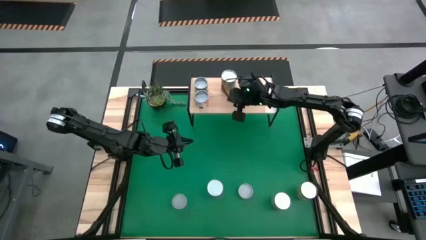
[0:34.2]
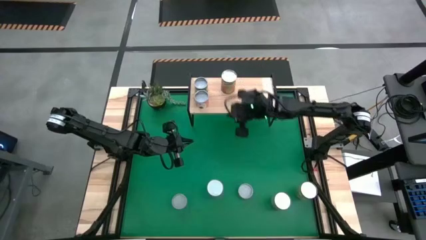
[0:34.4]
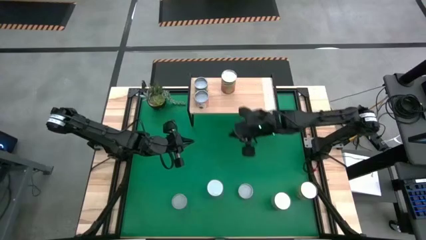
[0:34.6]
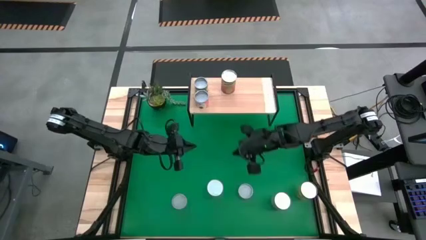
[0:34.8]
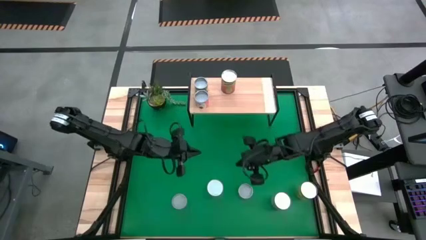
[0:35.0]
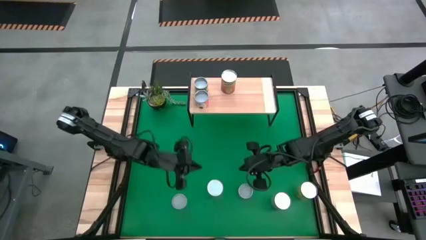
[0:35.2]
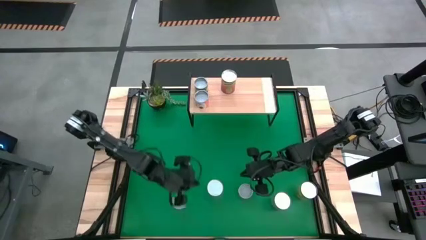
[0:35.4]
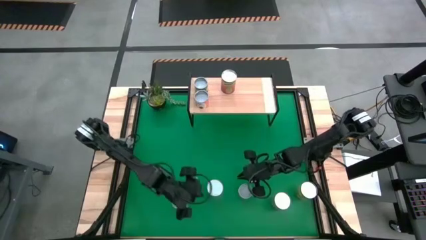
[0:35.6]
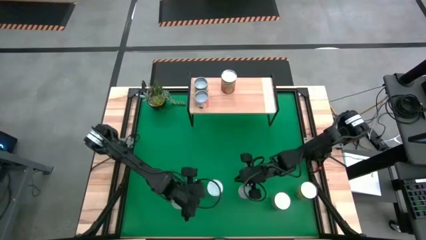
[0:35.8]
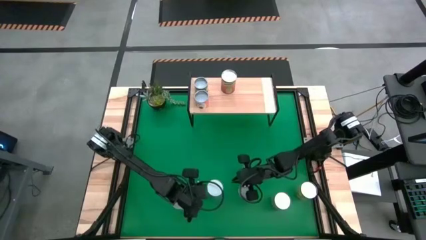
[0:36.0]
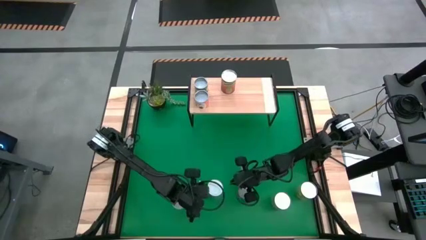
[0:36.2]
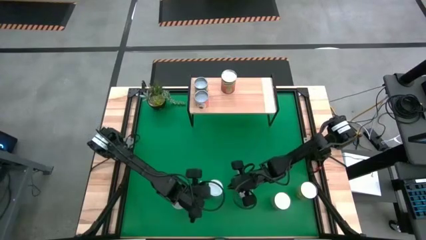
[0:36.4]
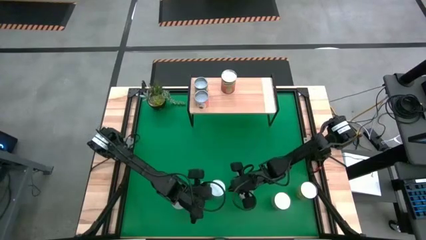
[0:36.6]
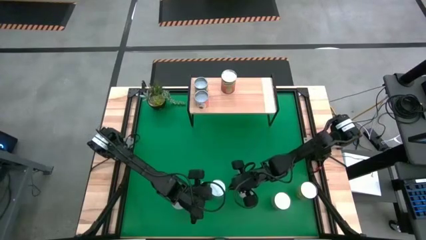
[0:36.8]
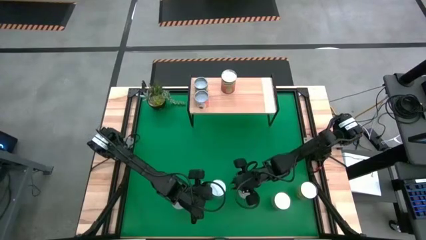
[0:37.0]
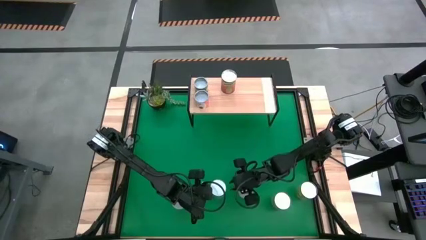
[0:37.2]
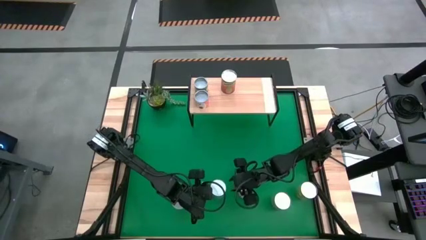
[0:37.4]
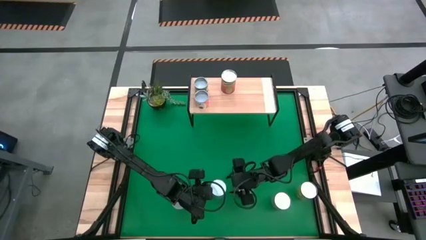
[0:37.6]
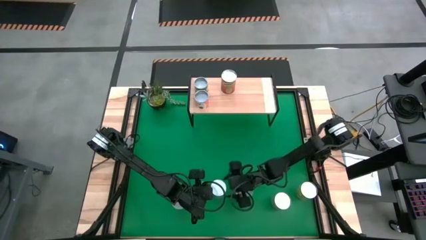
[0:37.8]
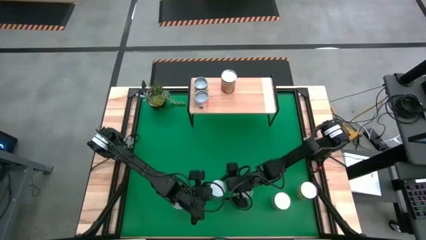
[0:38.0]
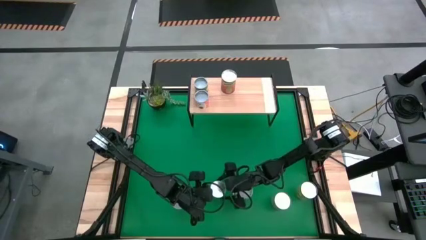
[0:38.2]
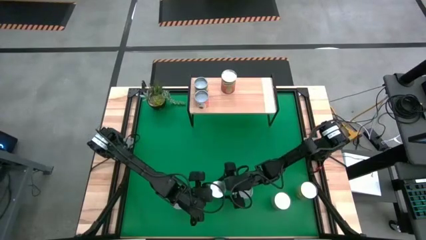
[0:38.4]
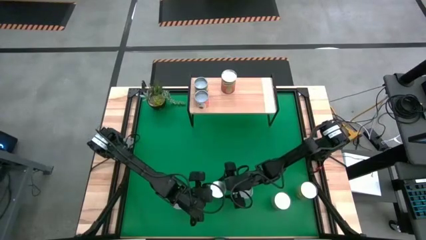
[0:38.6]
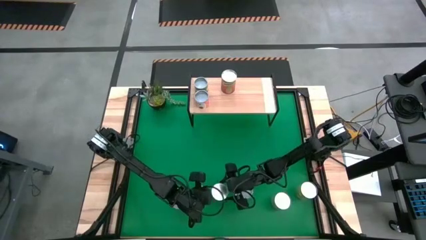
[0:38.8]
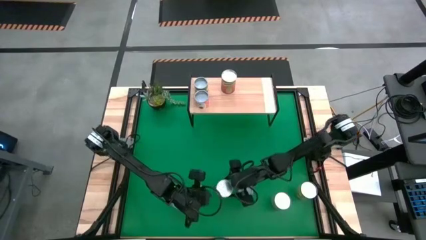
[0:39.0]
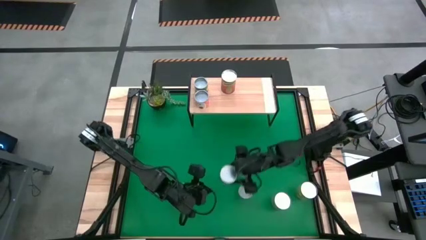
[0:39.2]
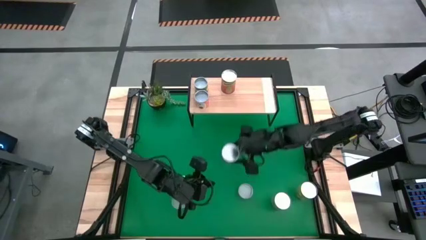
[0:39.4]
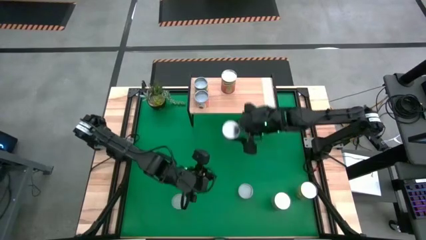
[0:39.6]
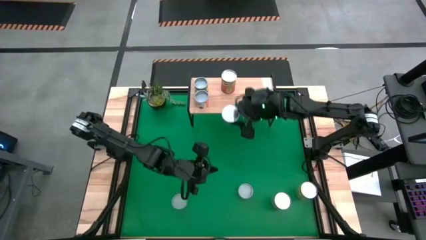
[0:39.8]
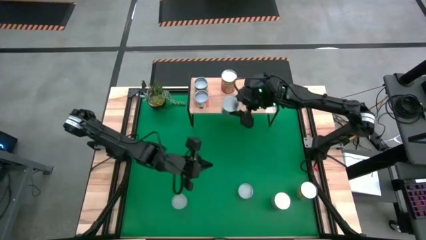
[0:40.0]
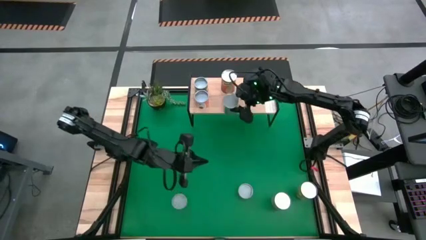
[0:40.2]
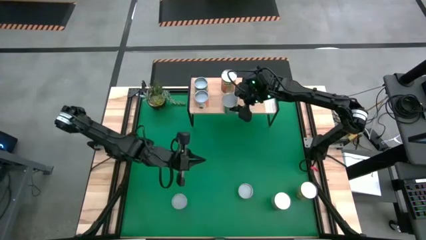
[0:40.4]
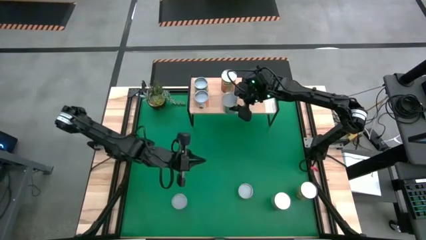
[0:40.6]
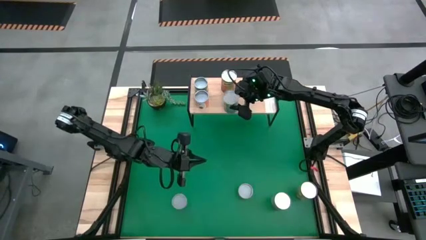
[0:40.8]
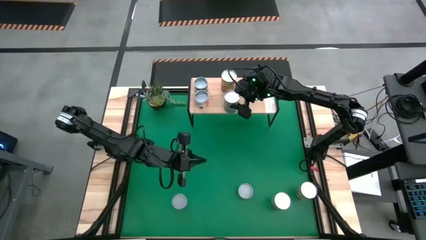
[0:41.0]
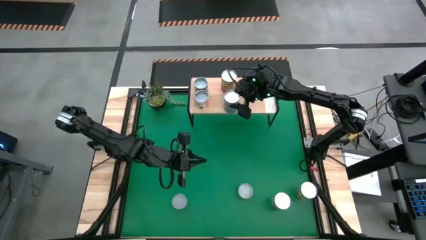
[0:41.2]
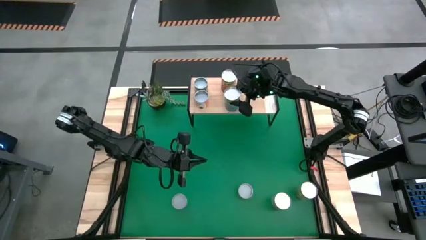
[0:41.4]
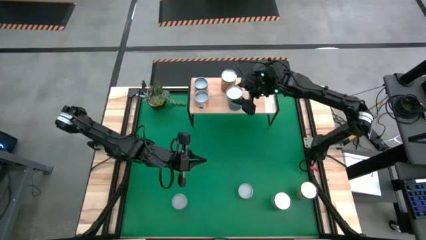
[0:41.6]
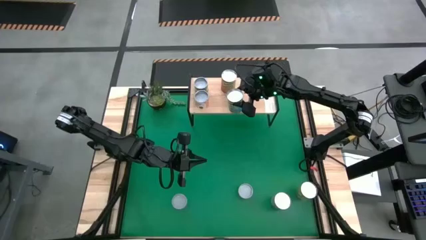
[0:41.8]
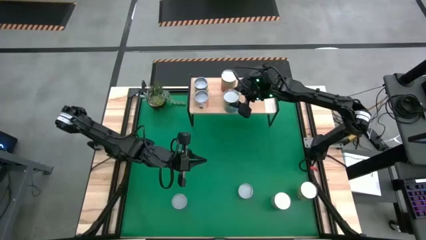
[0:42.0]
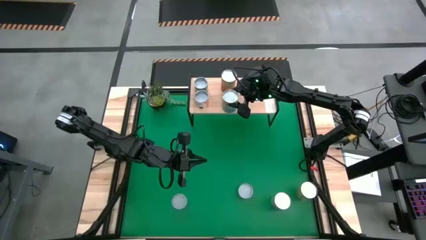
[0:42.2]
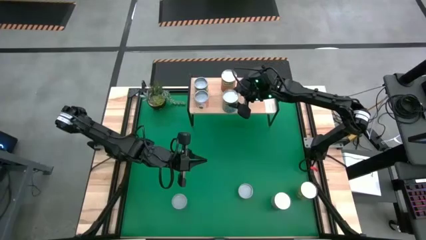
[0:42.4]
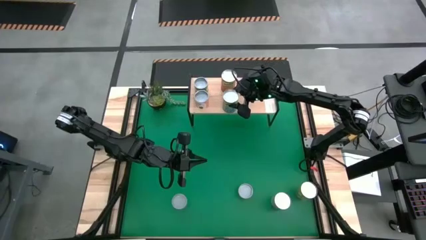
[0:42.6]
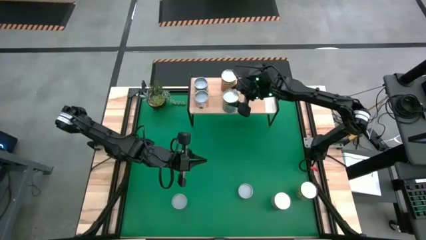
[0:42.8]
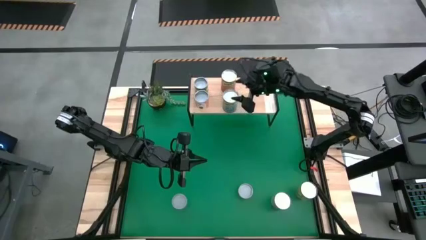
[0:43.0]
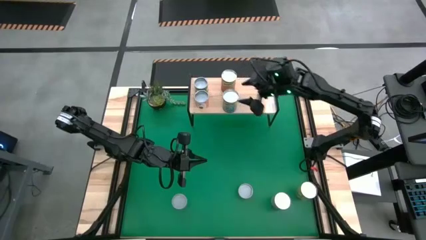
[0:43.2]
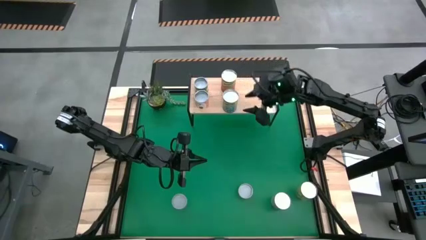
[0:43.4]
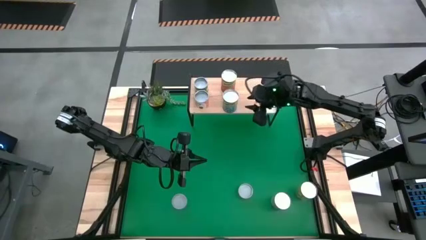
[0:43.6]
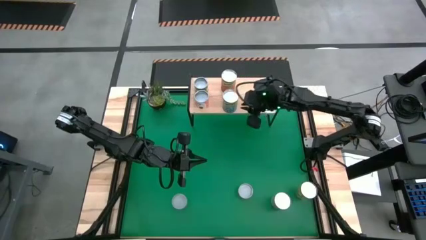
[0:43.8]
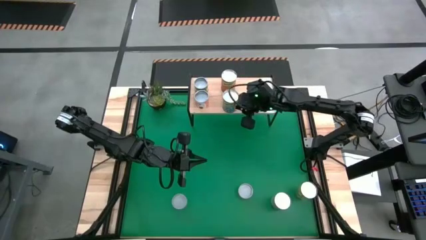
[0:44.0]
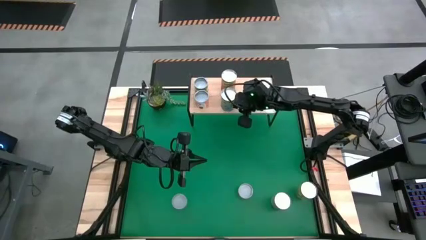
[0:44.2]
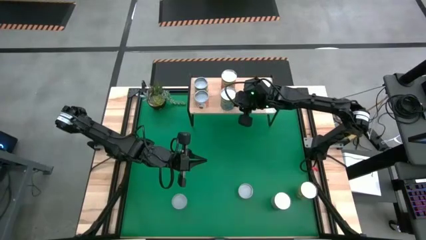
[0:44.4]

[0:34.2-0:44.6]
Task: Pick and place cans onto a shelf
Put the canned cherries on the shelf

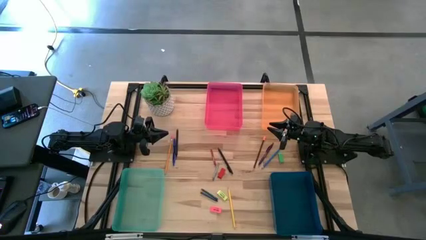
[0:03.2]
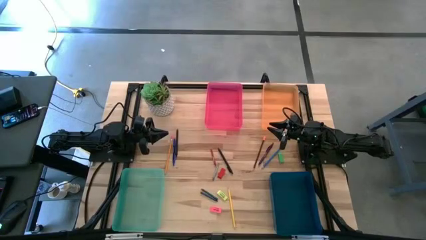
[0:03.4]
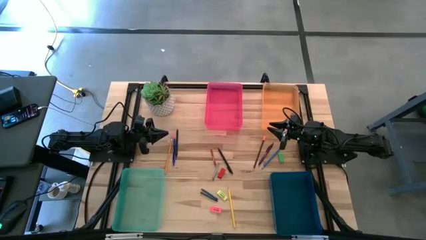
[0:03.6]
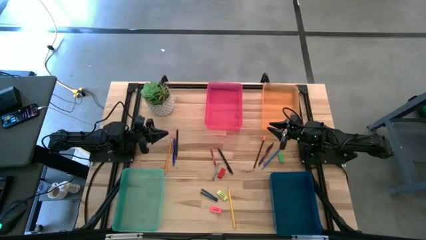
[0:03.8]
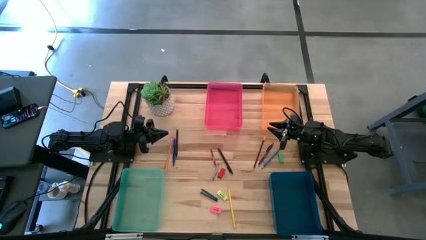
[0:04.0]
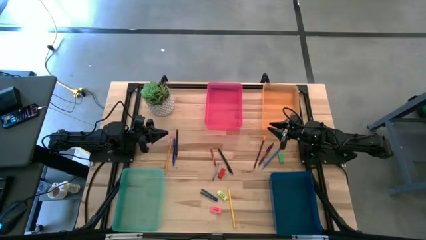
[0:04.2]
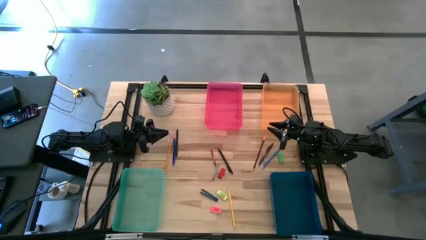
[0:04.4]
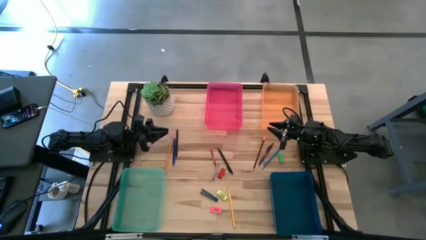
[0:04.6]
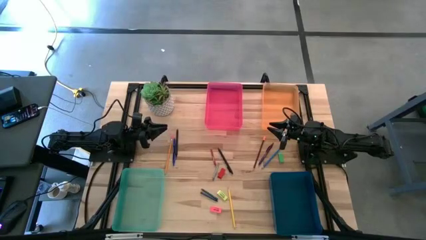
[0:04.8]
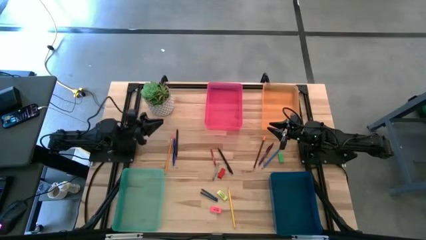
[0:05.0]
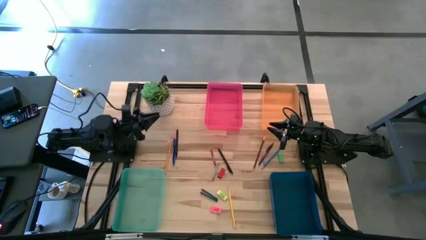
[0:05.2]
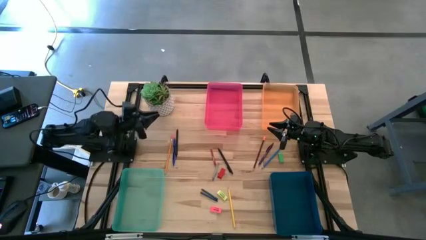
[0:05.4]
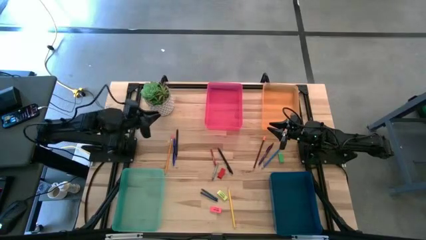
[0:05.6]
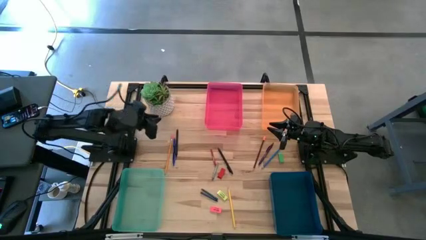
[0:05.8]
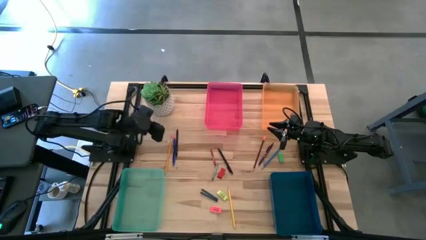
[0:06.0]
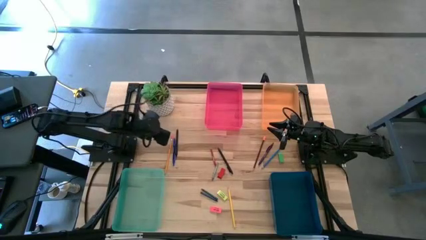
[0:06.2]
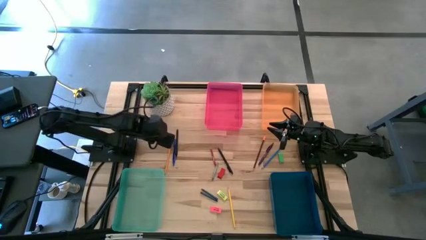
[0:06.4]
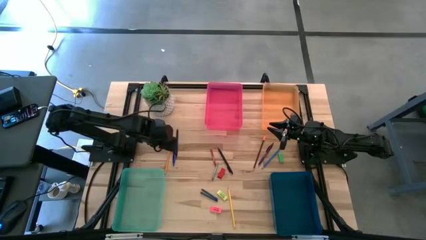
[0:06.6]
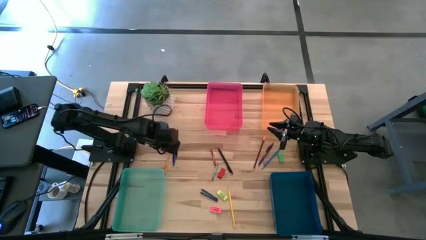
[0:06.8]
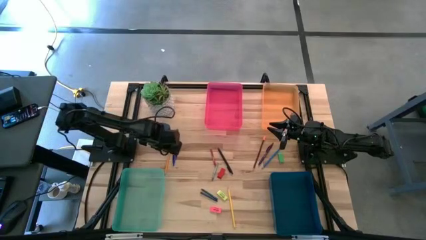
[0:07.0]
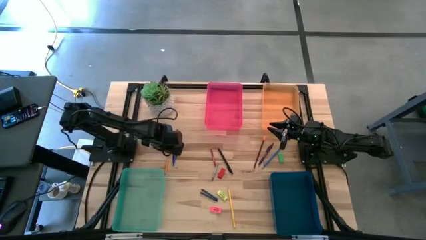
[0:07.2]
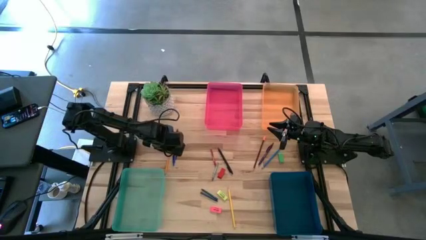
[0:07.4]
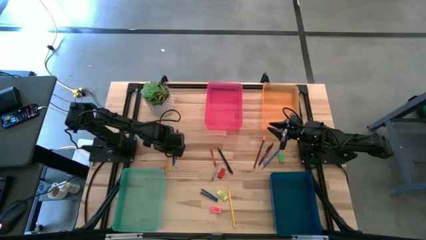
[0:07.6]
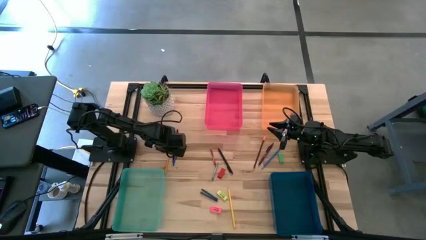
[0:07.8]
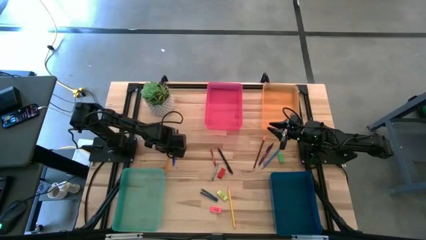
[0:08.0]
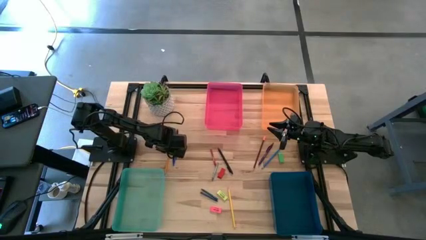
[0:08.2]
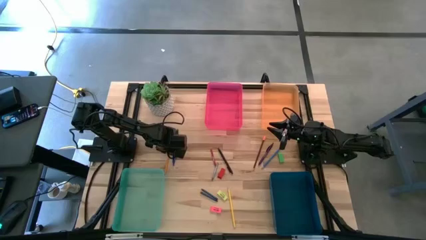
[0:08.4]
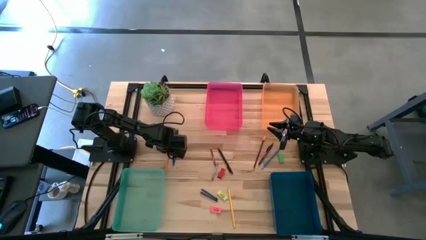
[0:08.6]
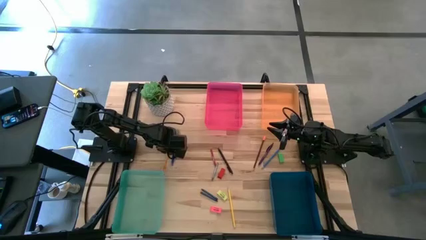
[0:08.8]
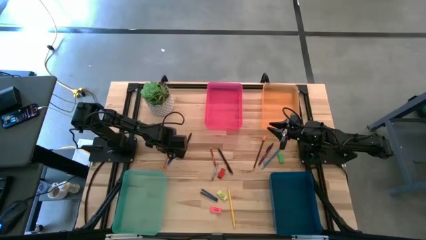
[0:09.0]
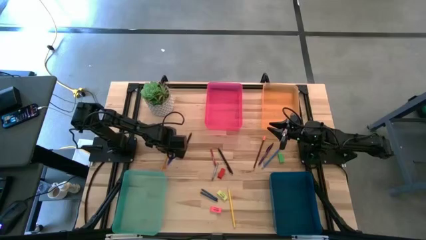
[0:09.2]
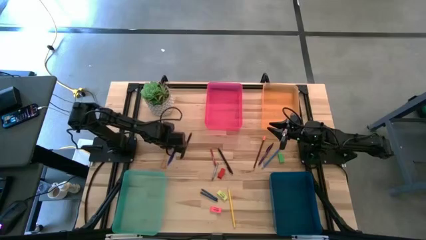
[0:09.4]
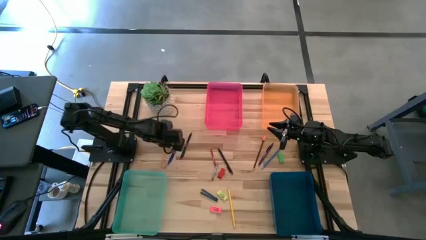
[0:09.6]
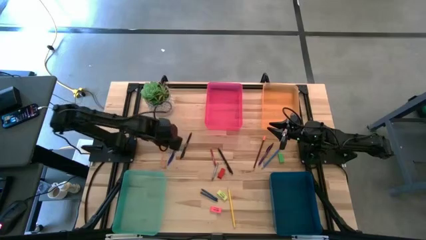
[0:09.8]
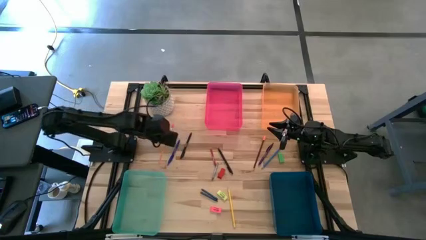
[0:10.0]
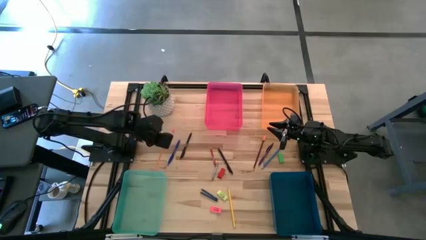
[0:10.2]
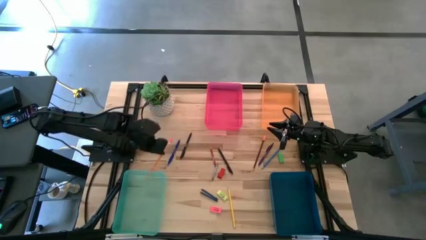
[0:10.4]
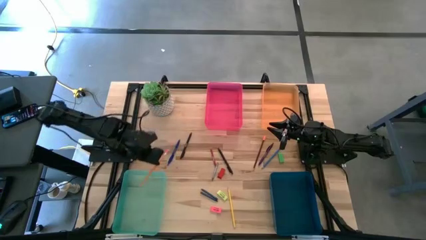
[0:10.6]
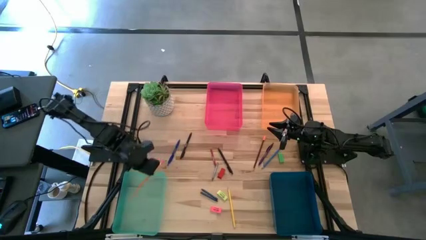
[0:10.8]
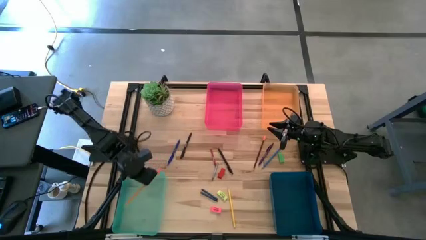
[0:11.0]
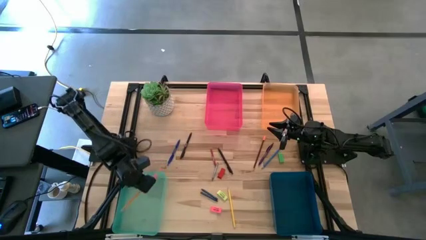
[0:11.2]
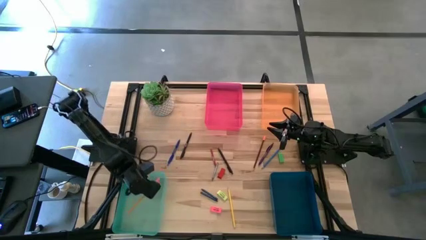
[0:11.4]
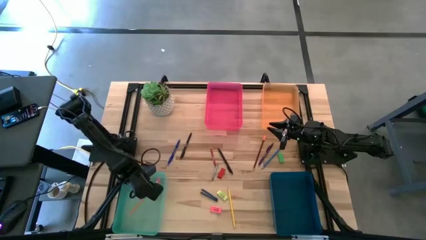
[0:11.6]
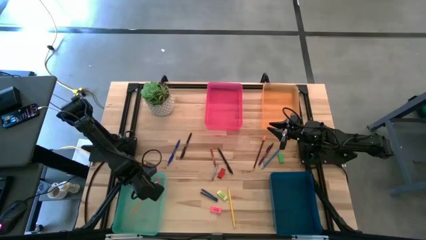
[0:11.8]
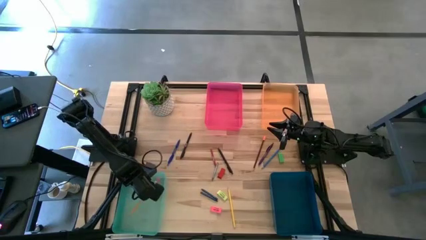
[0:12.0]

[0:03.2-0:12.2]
Task: Sort crayons/erasers/pens/pencils in bins
Put the orange pencil into the green bin bin
